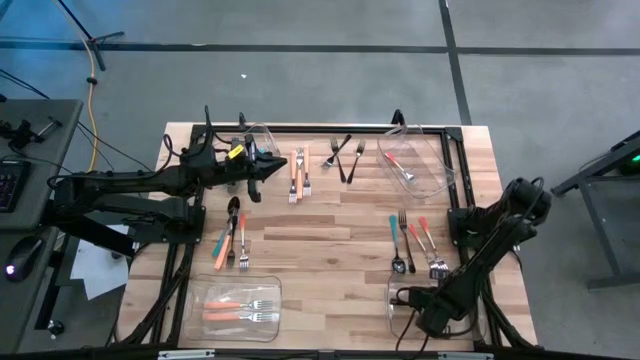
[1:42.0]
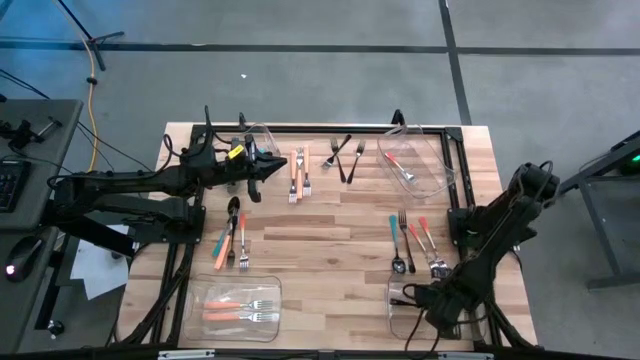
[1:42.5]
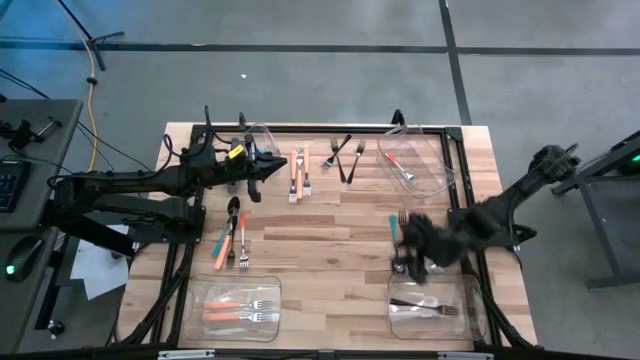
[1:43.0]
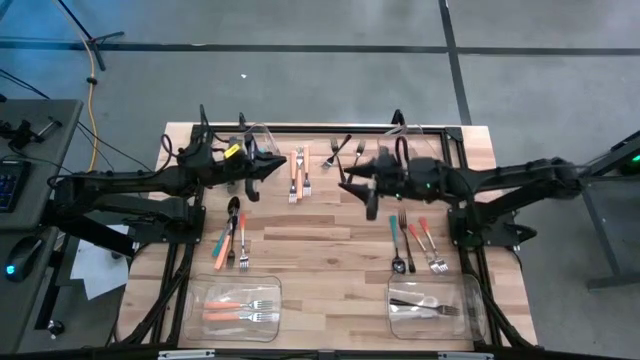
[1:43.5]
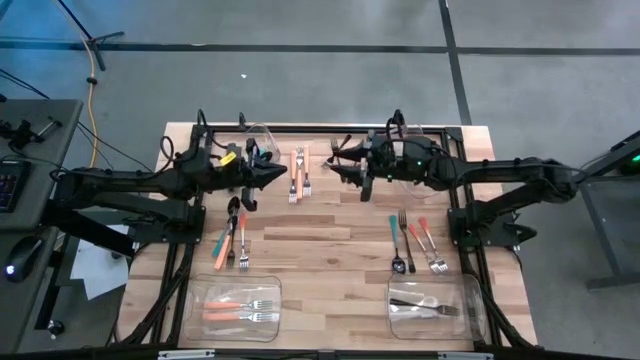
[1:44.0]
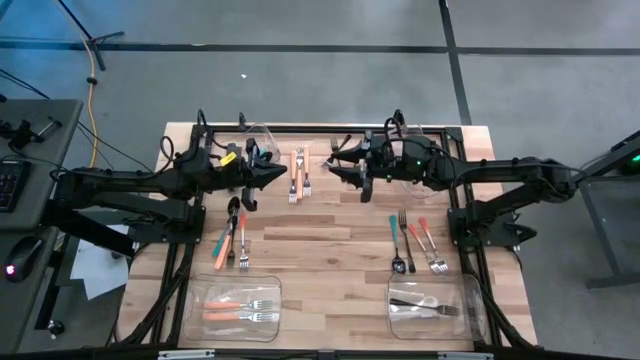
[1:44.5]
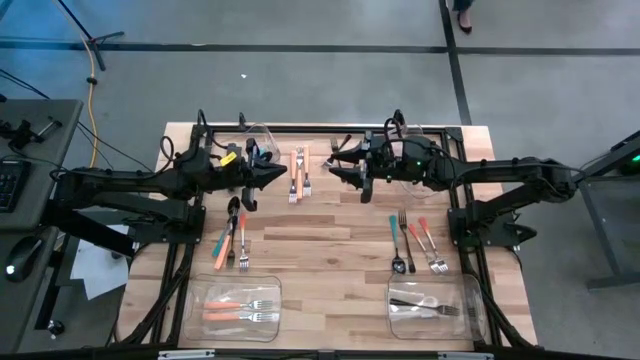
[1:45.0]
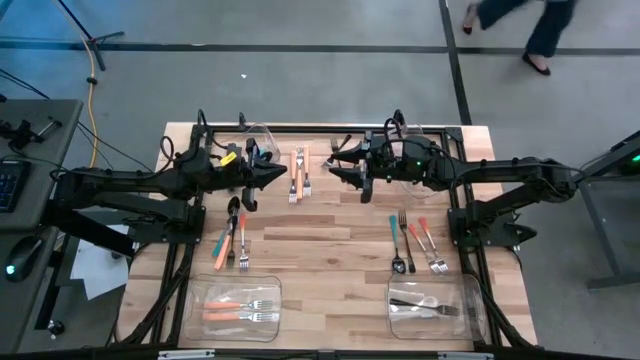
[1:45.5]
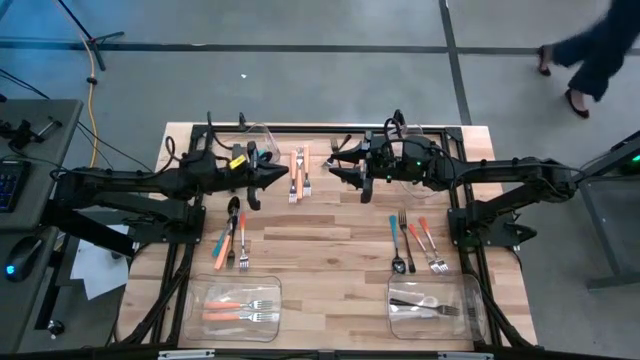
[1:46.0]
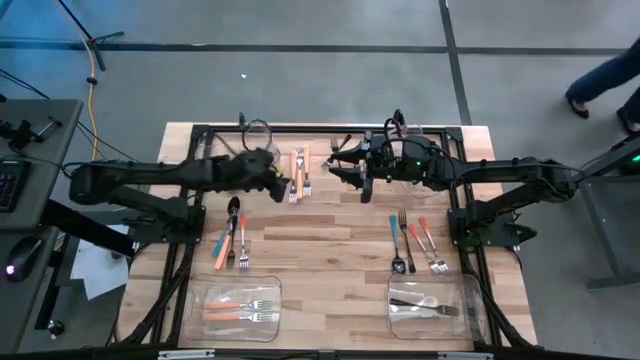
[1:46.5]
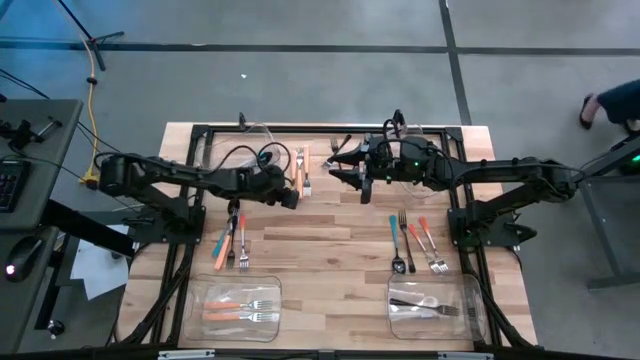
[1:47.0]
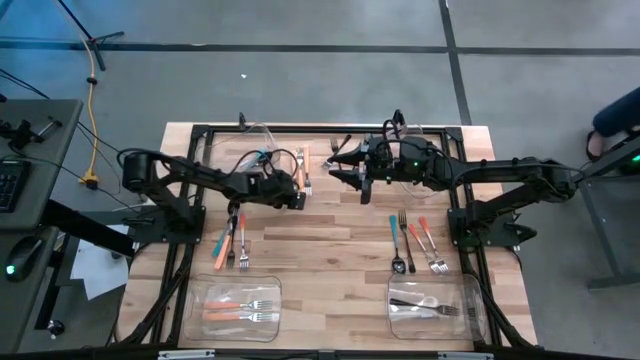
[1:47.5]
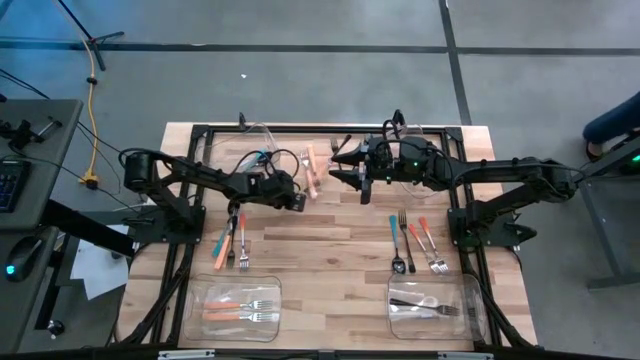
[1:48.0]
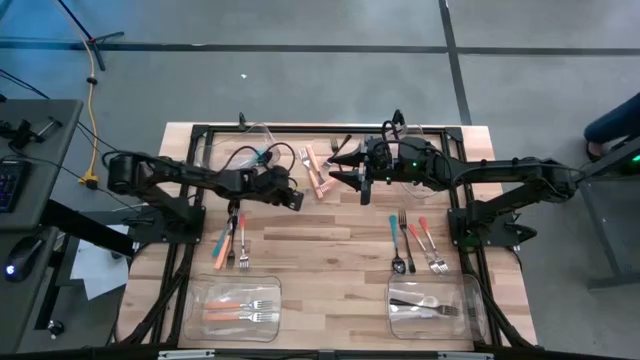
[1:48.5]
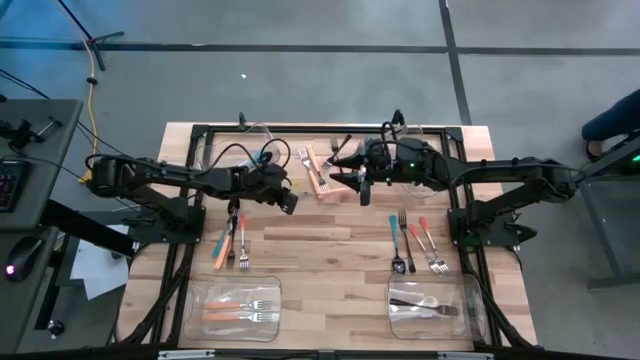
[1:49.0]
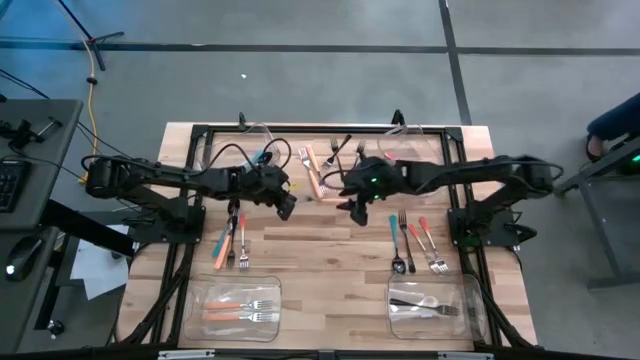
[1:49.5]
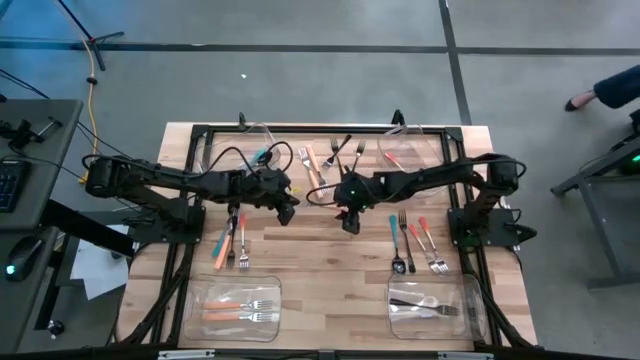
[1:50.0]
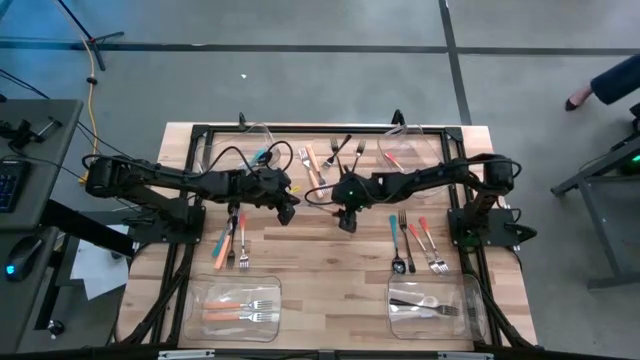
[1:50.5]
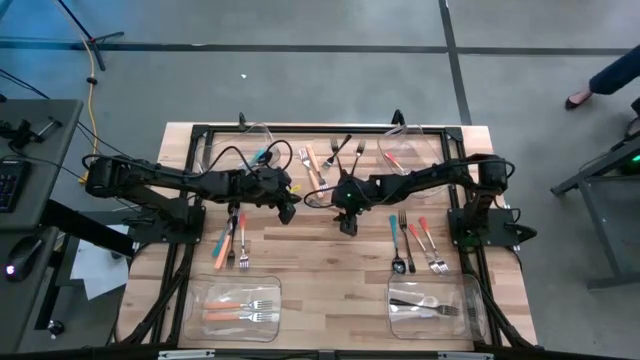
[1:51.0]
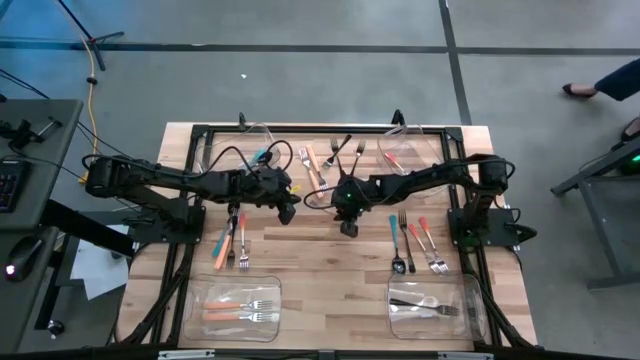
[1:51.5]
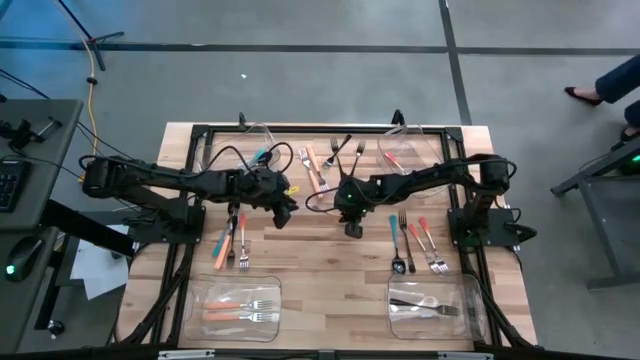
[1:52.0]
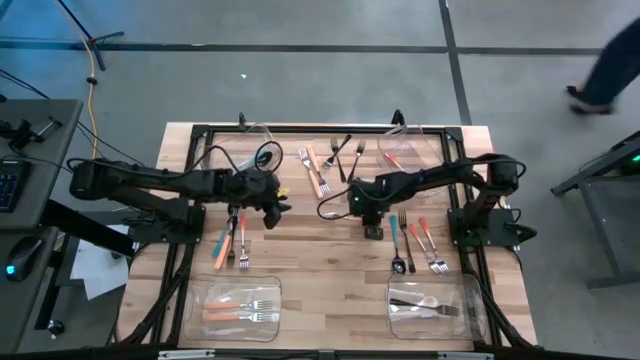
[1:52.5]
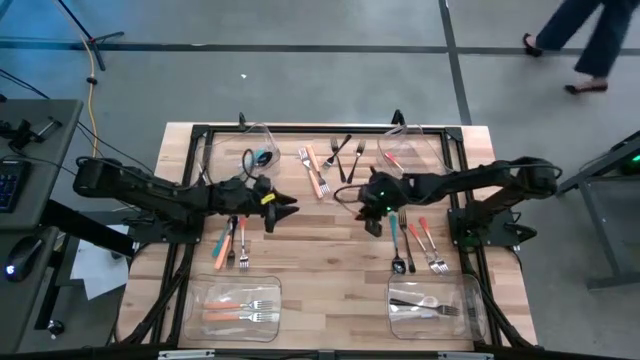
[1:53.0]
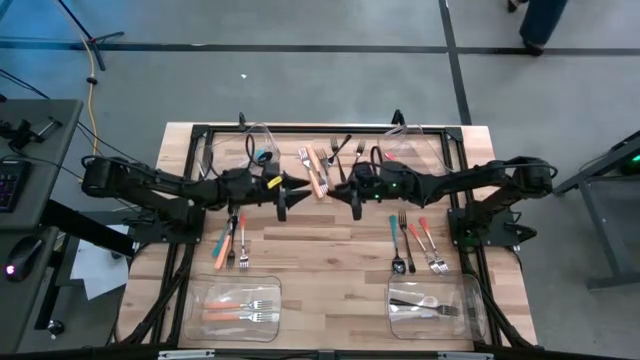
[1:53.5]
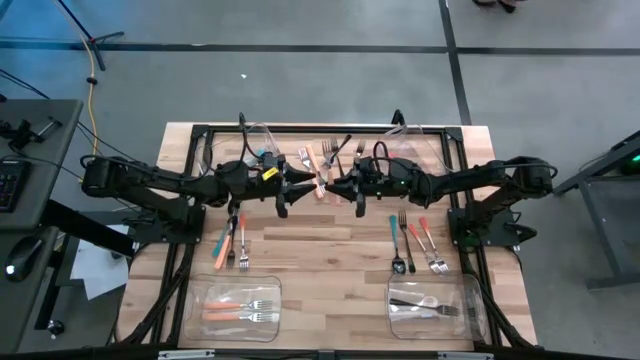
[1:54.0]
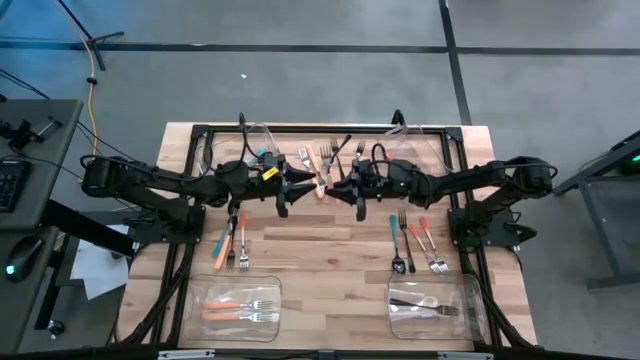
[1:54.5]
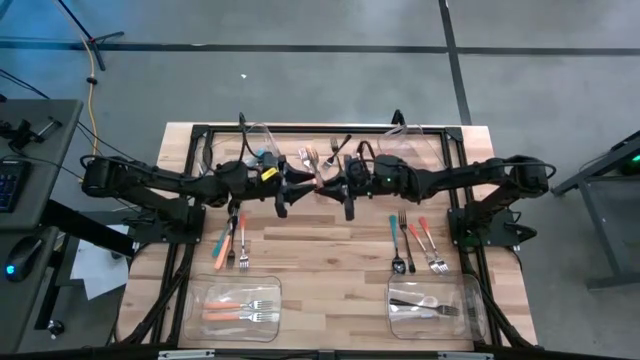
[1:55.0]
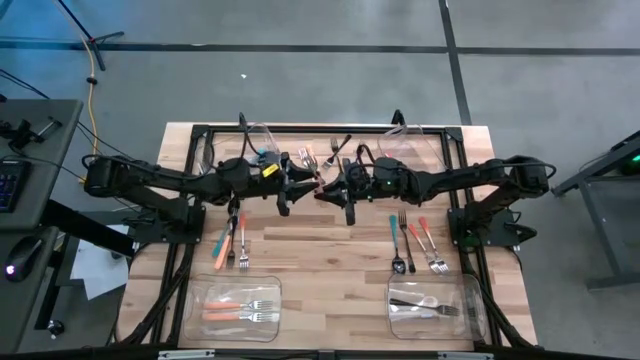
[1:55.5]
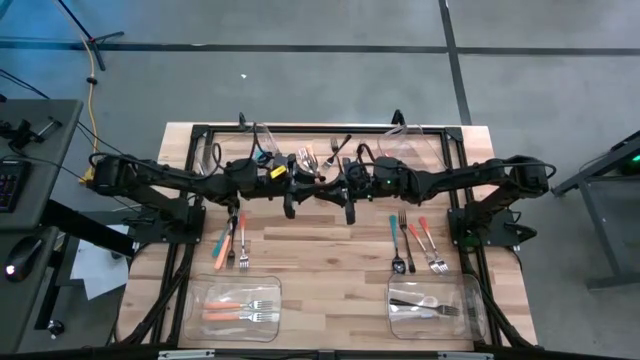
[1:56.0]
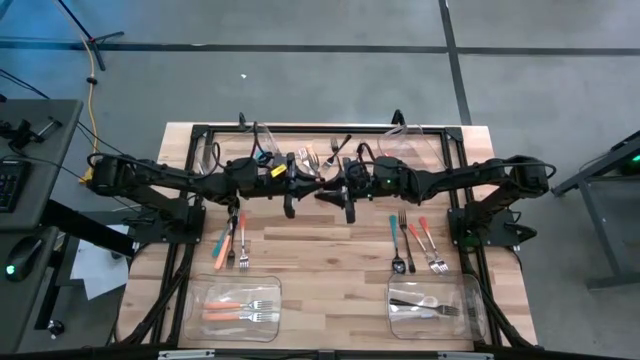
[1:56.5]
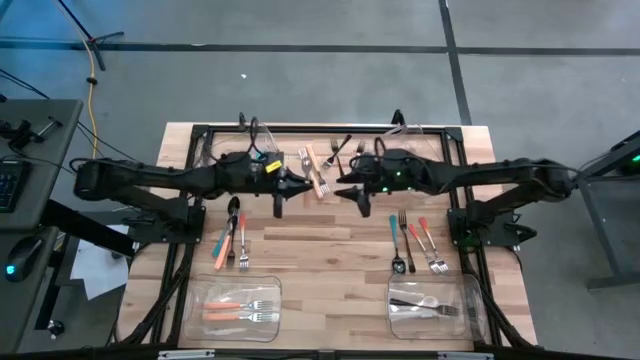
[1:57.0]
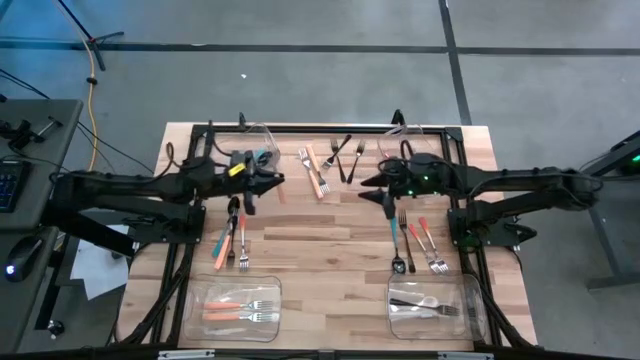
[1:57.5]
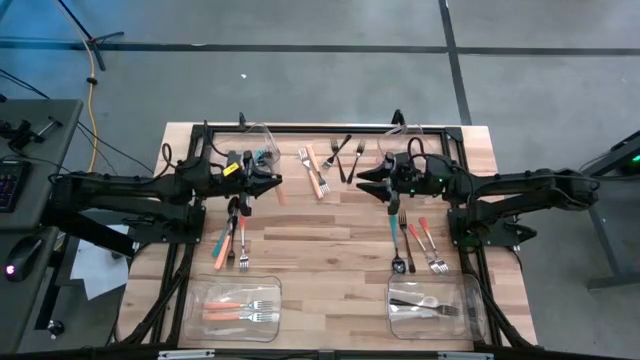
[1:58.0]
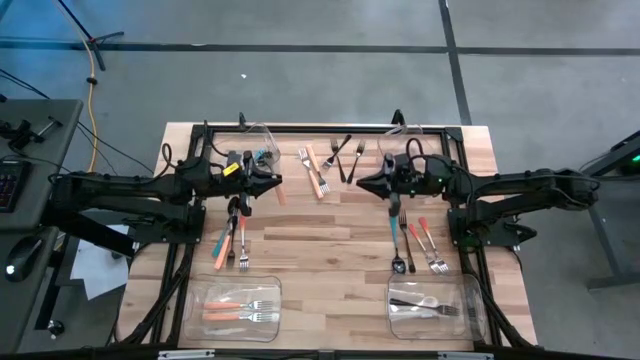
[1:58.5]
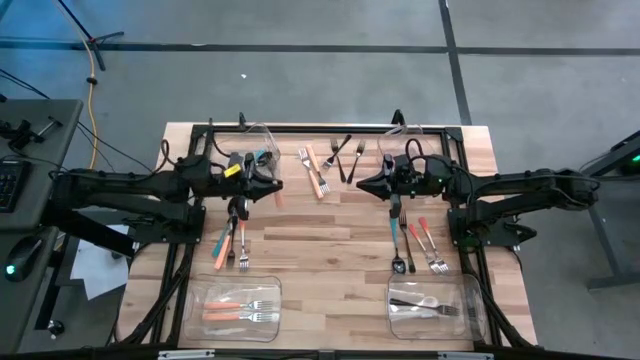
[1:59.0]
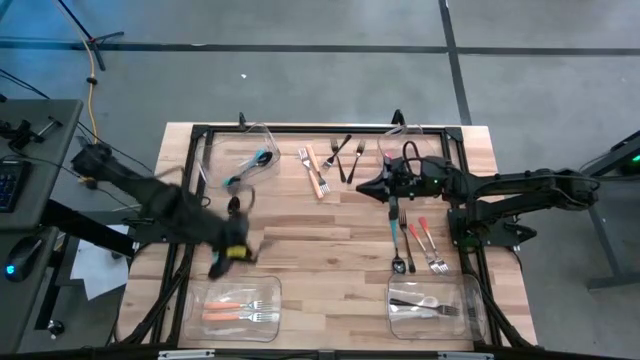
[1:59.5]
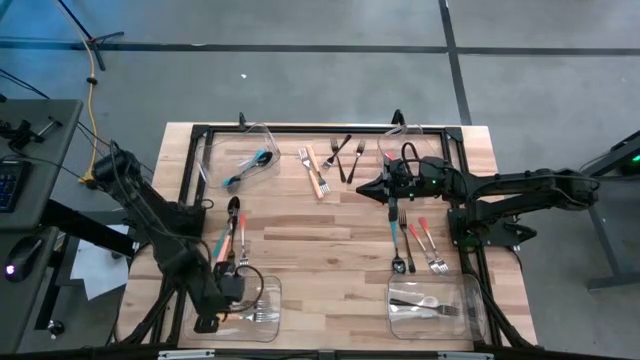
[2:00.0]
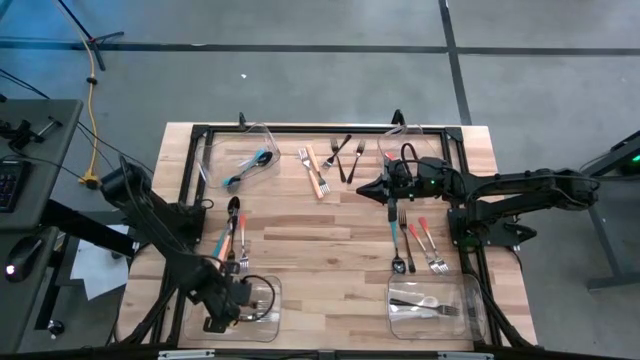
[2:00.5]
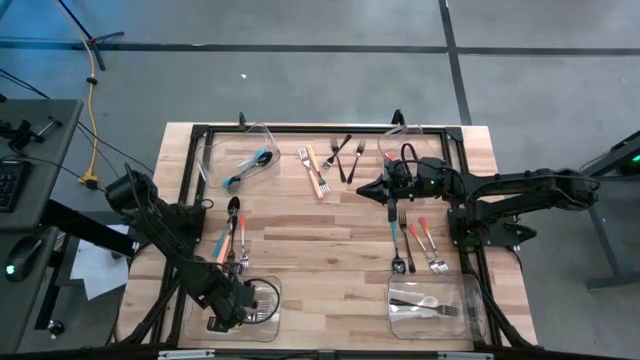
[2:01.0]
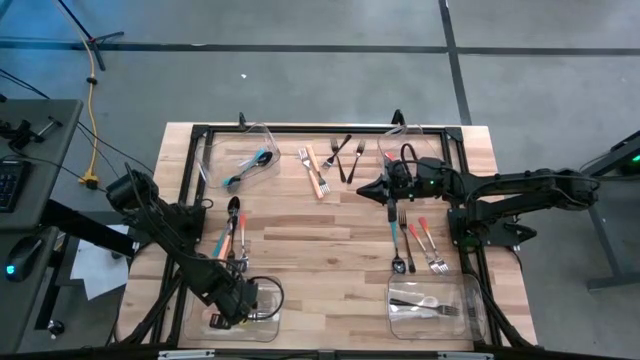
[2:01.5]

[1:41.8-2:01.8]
Task: Sort silverware by color (type)
Put the light orange fork into the bottom left transparent bin

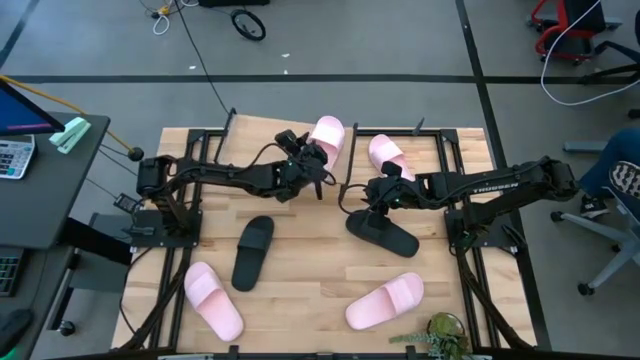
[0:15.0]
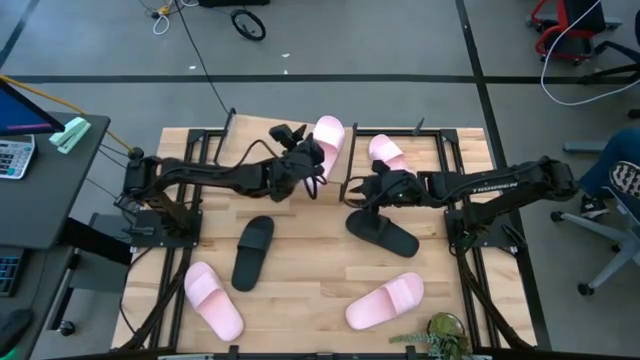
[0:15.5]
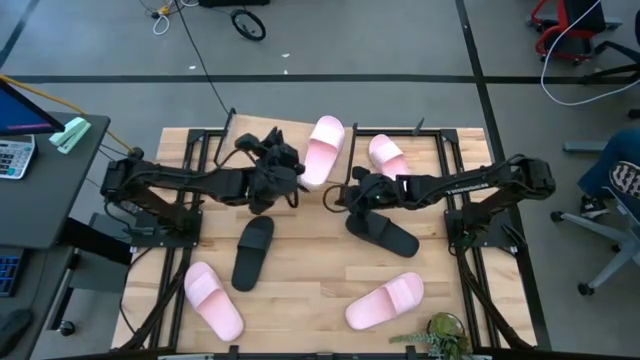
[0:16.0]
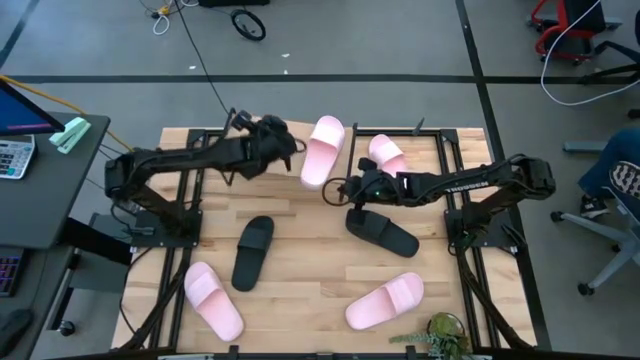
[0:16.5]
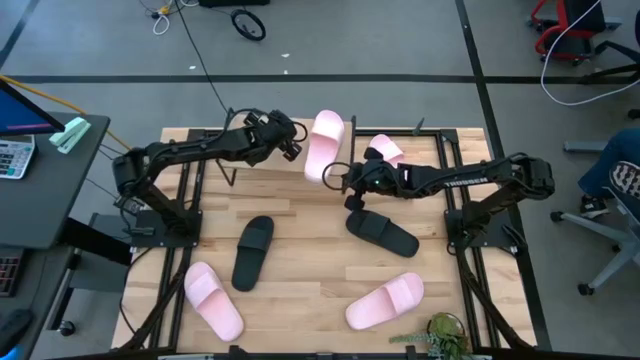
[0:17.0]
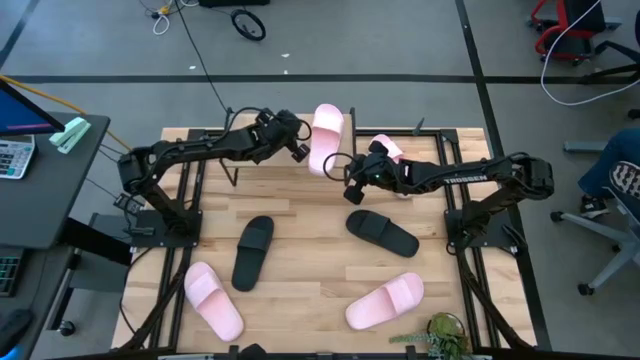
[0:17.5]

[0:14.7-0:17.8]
Task: Pick and place slides into the shelf
Adjust the shelf
